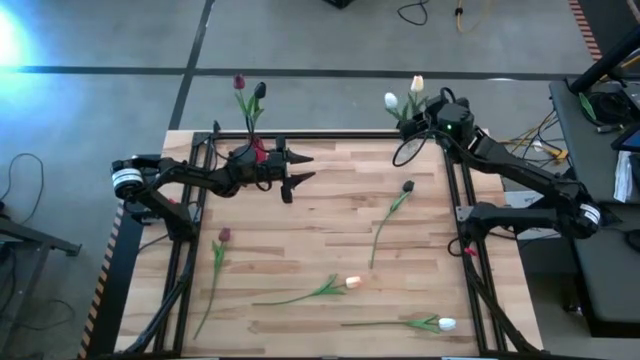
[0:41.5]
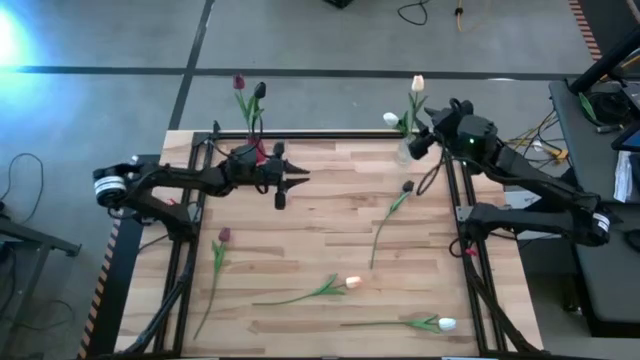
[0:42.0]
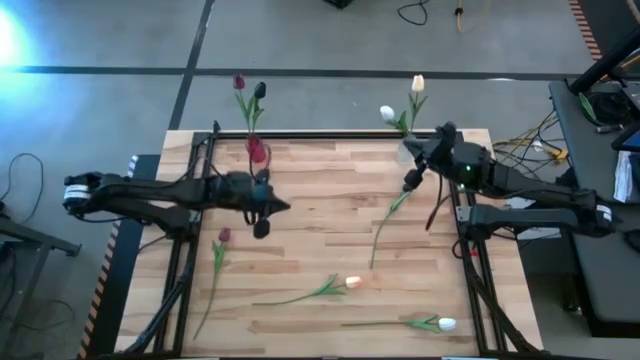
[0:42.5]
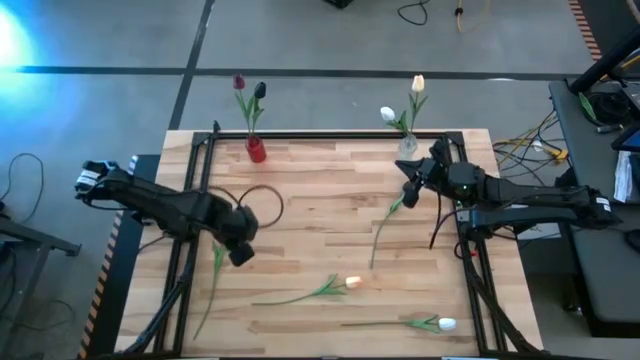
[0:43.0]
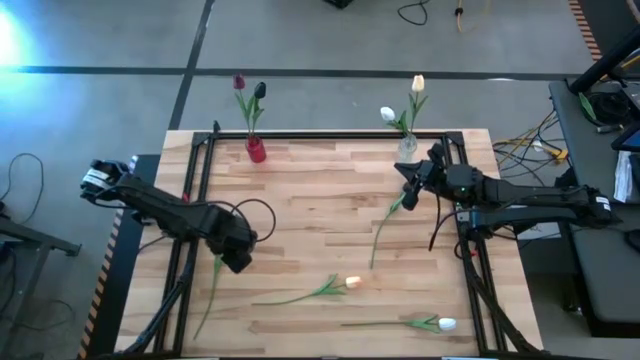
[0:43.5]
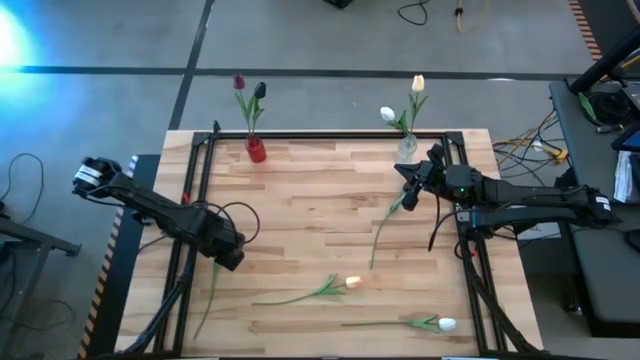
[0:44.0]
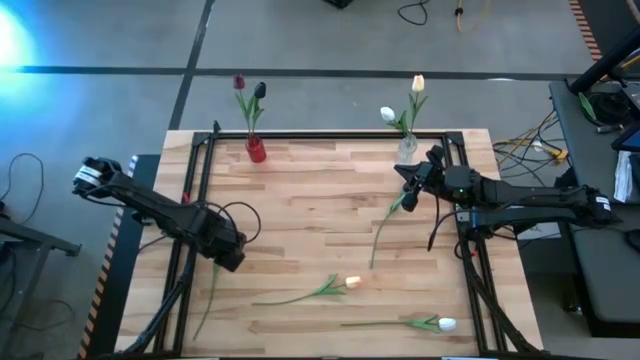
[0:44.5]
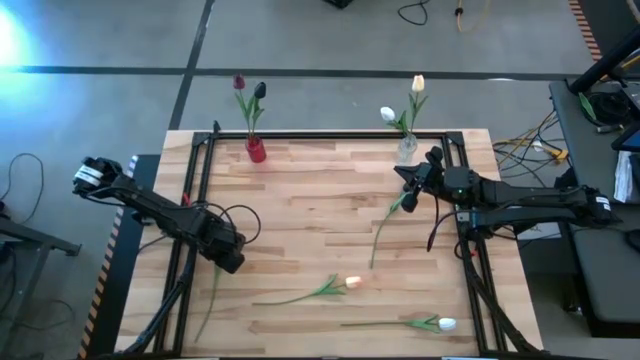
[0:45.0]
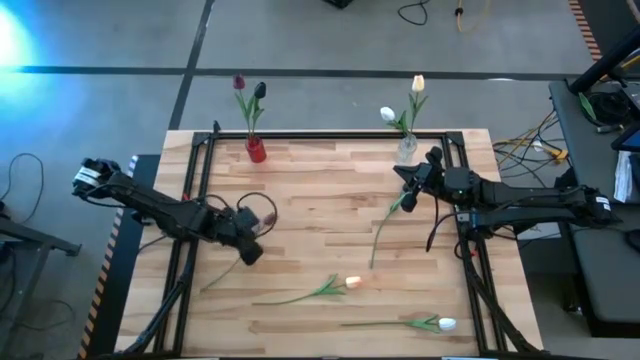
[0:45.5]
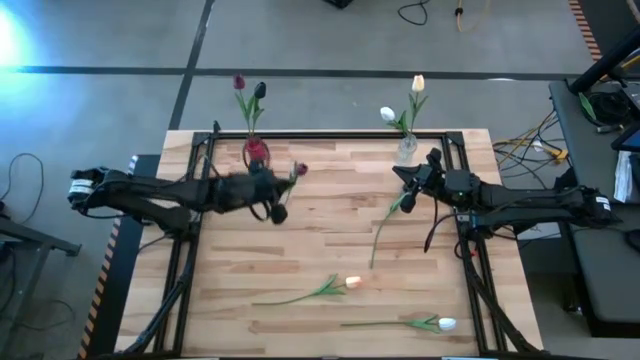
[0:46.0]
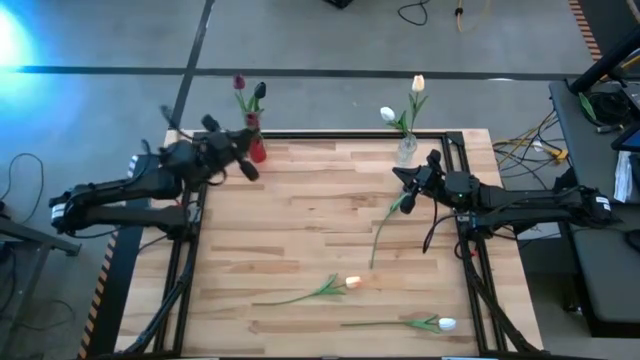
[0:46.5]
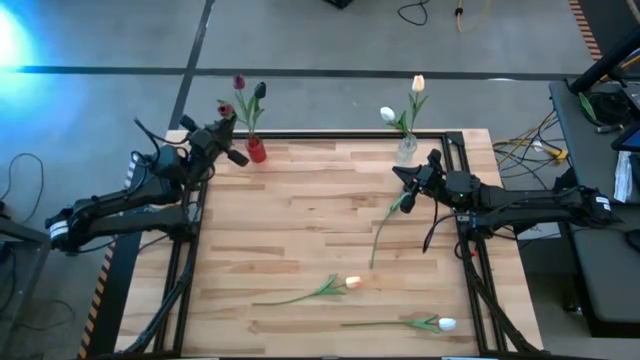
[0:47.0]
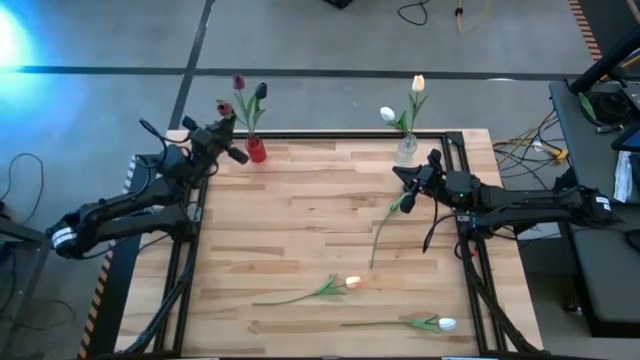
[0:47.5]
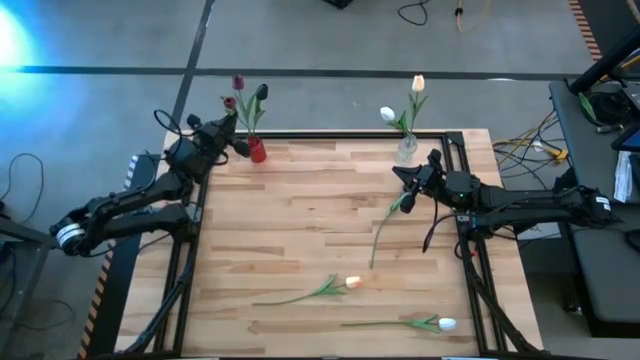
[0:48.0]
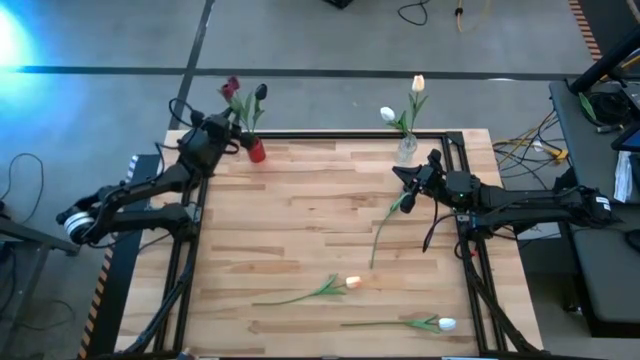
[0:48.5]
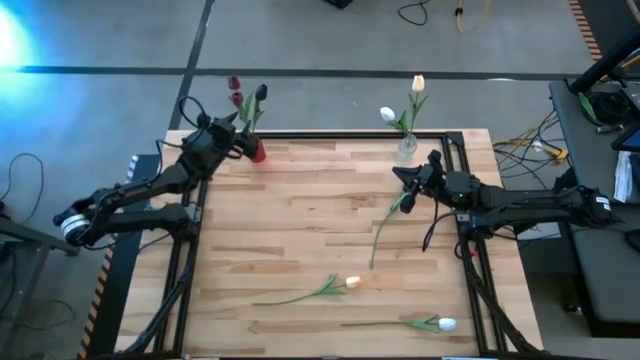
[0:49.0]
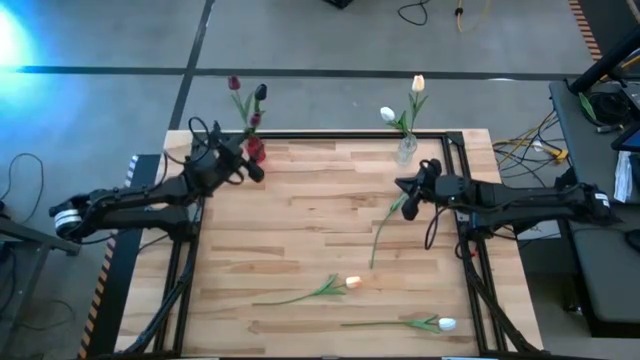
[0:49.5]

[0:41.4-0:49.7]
Task: Sort flowers into vase by color
Put the red flower into the red vase

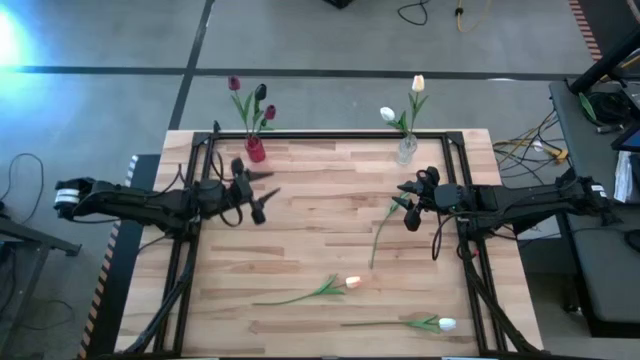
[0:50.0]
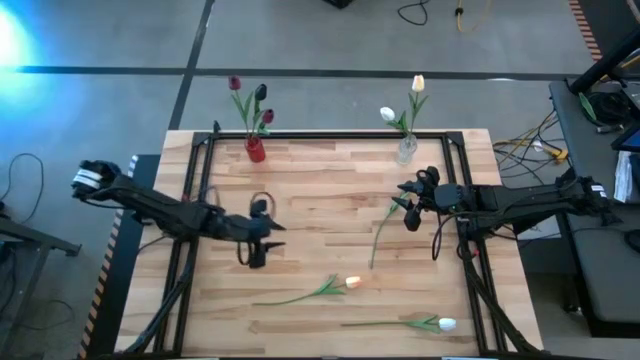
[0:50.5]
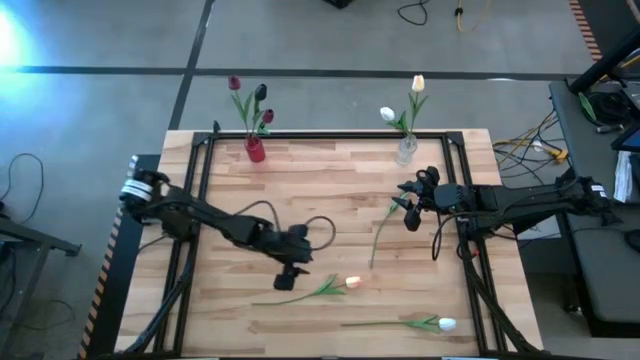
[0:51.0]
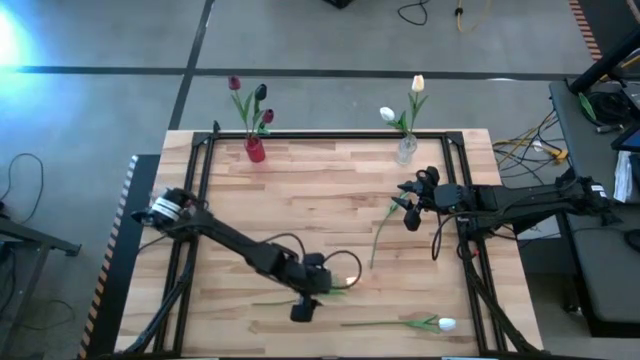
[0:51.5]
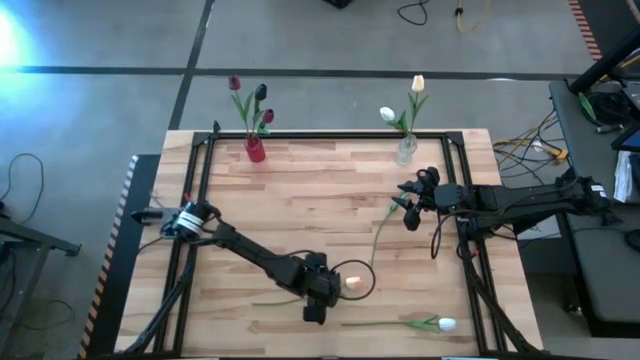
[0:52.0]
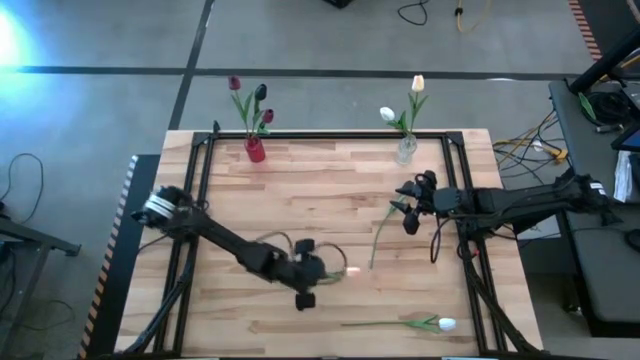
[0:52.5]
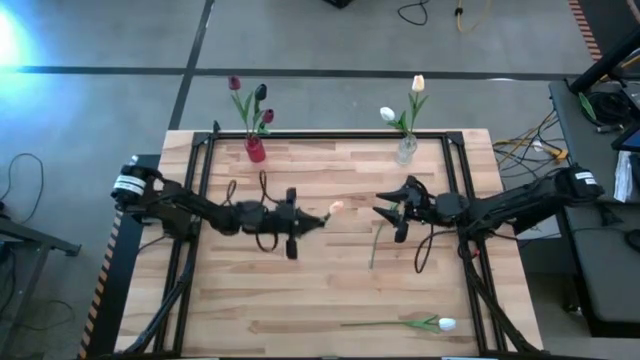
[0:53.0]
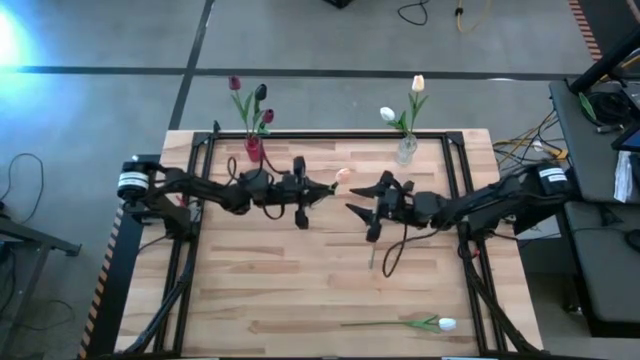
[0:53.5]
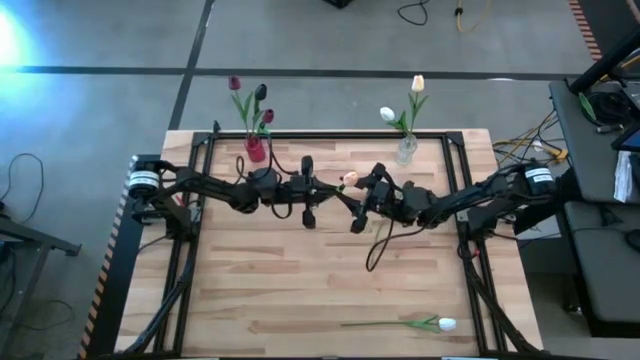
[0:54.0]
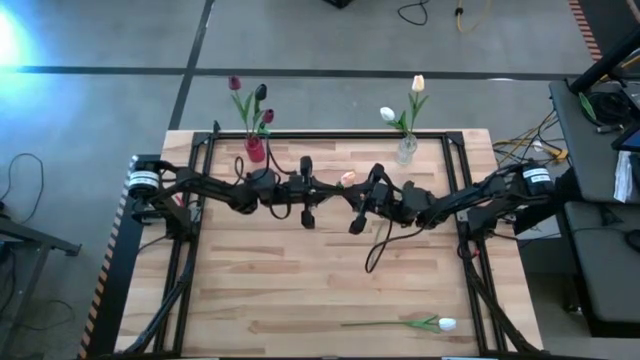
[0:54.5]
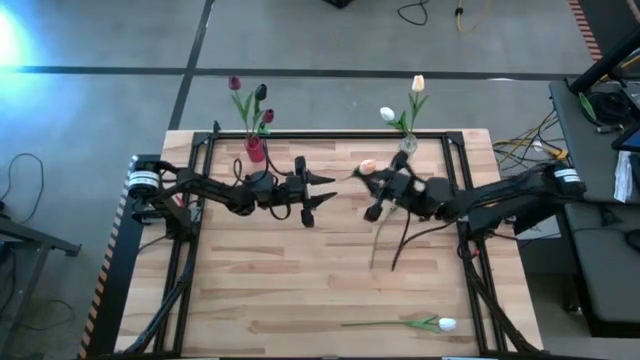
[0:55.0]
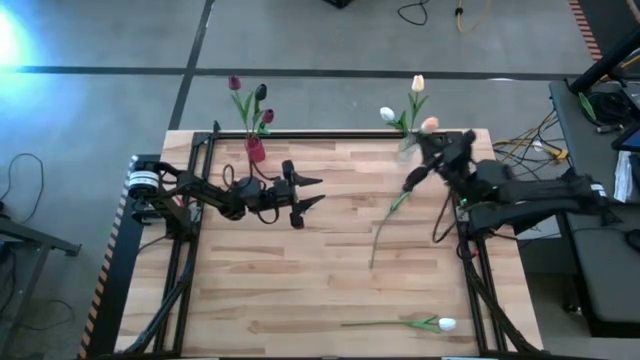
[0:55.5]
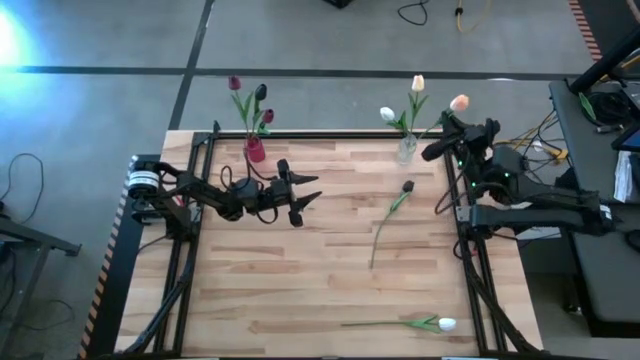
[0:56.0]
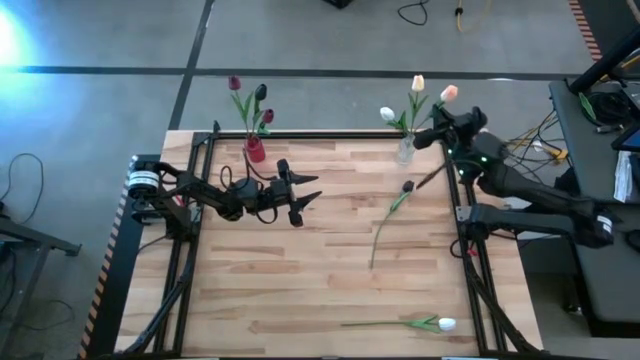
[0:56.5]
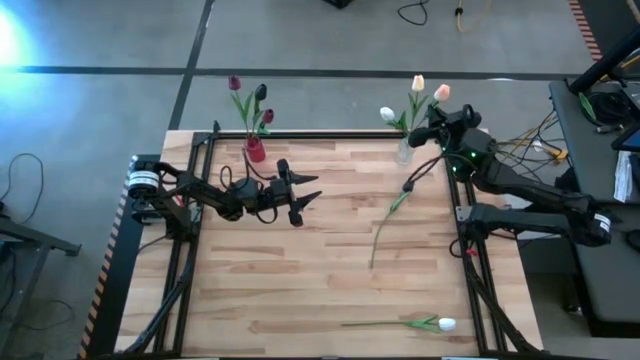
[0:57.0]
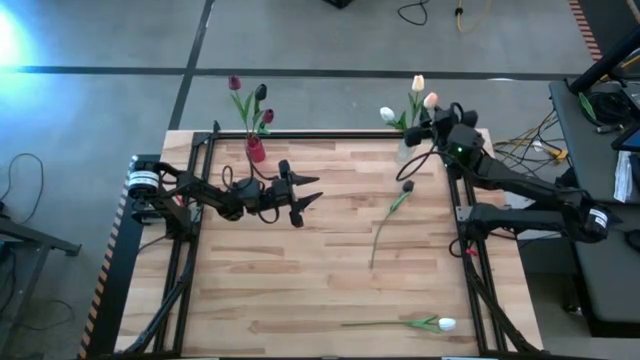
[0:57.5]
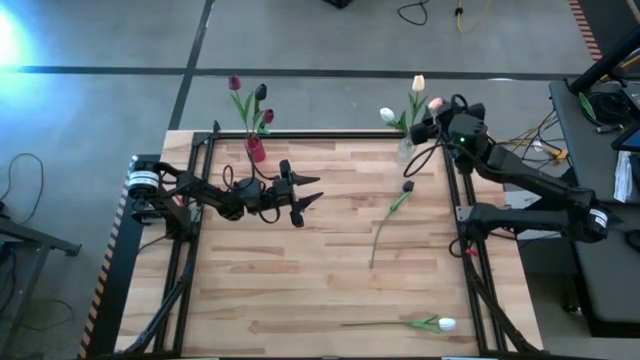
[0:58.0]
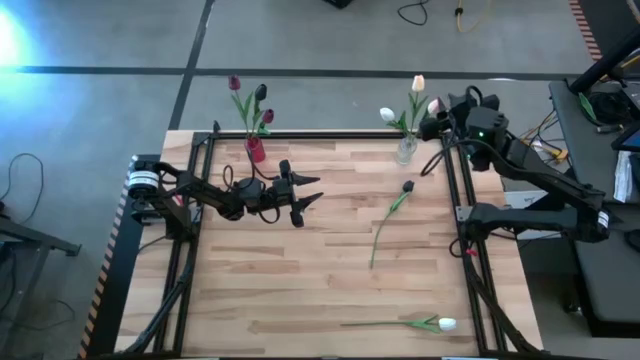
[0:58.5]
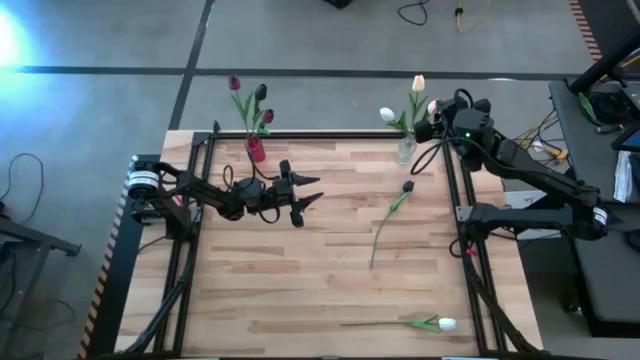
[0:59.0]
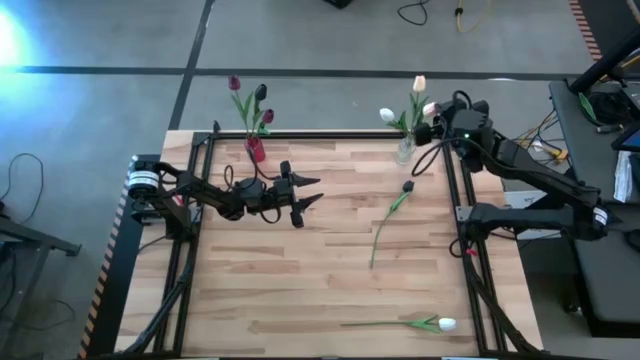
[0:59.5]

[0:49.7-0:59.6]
Put the light pink flower into the transparent vase
